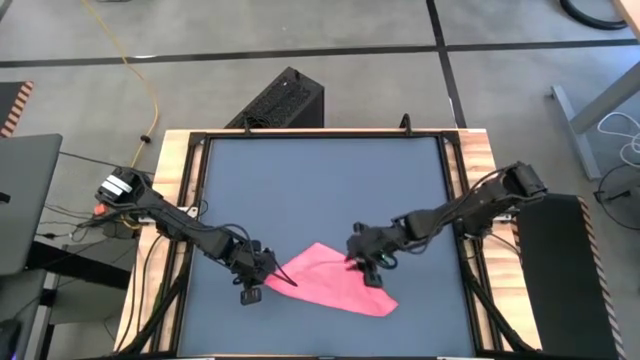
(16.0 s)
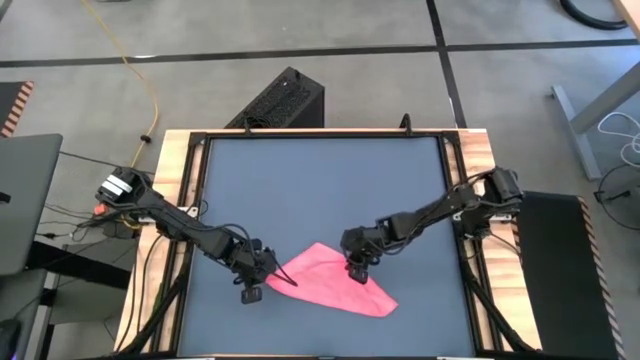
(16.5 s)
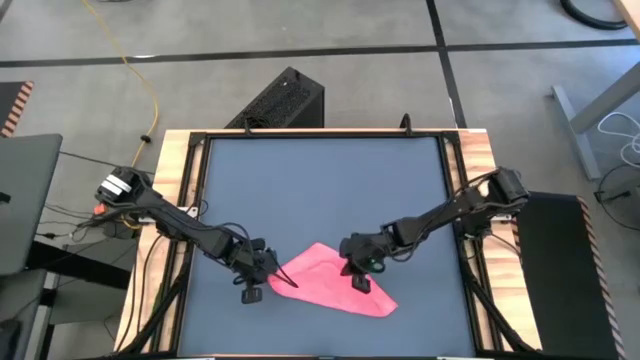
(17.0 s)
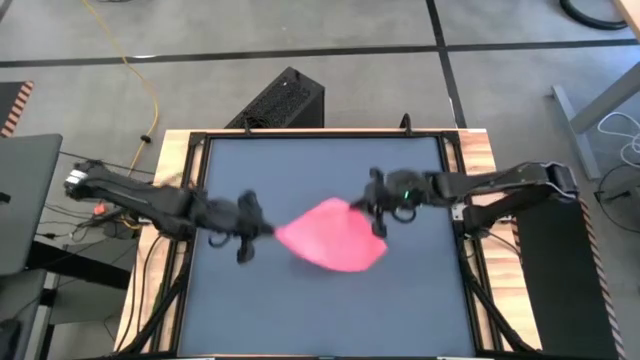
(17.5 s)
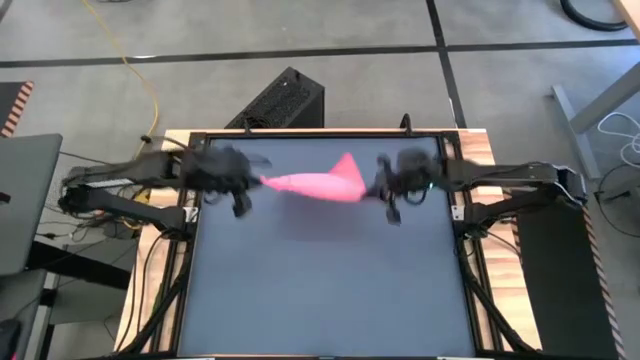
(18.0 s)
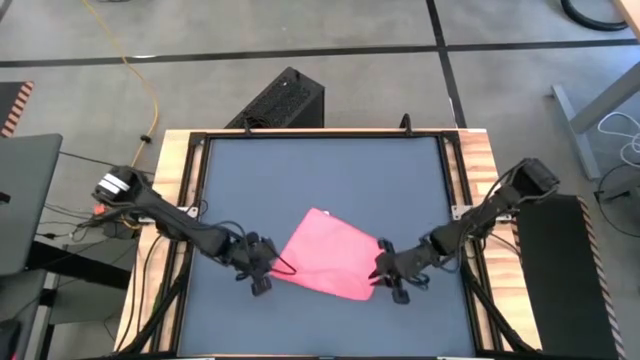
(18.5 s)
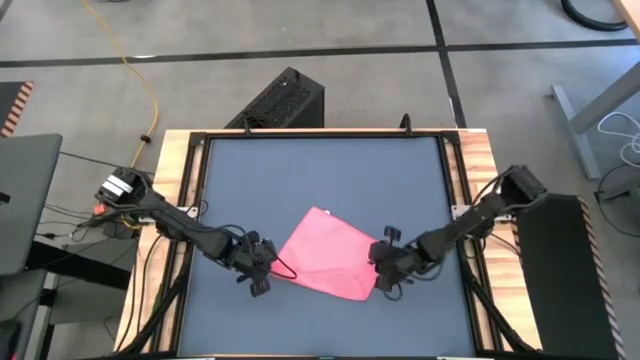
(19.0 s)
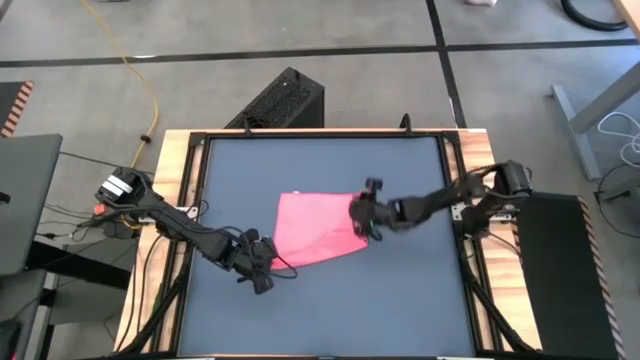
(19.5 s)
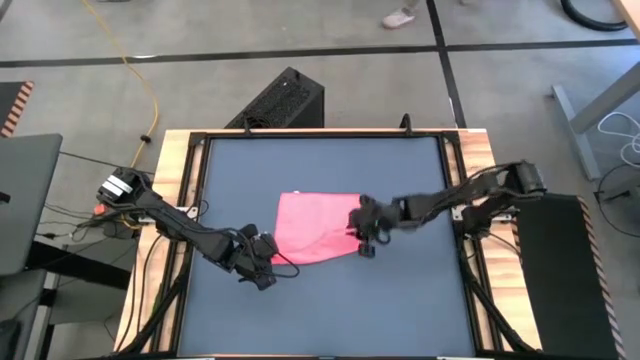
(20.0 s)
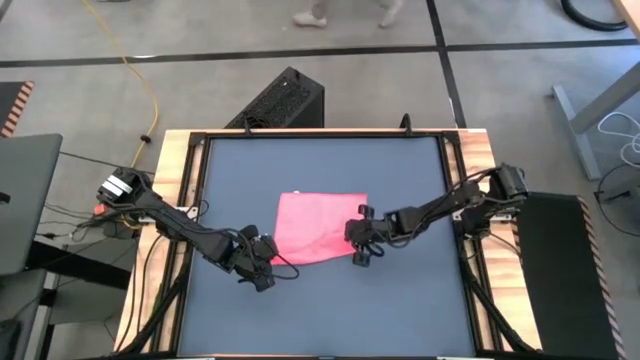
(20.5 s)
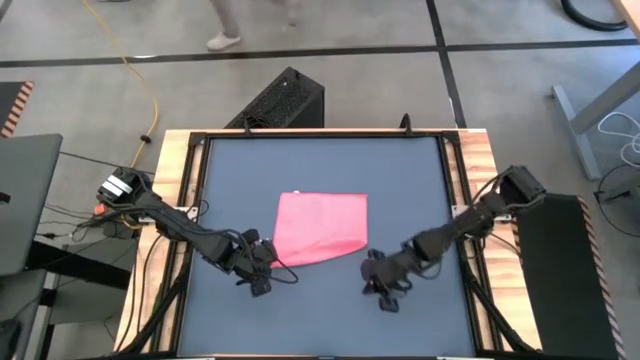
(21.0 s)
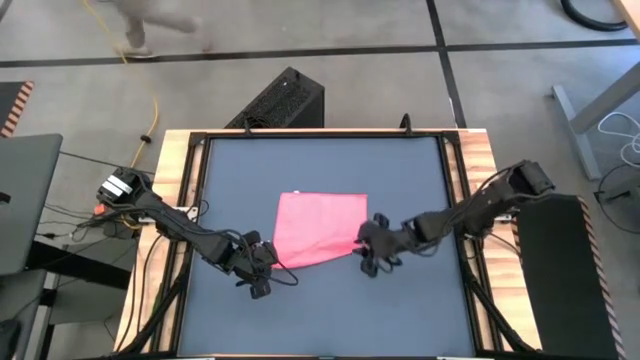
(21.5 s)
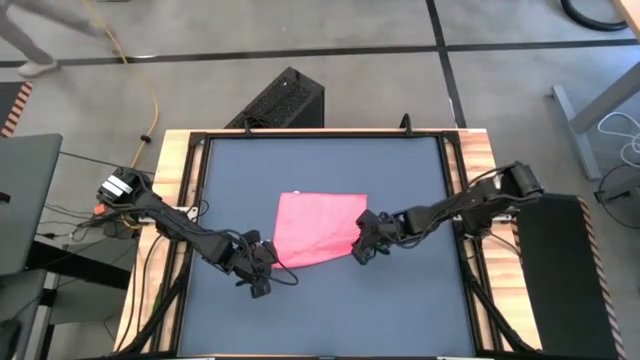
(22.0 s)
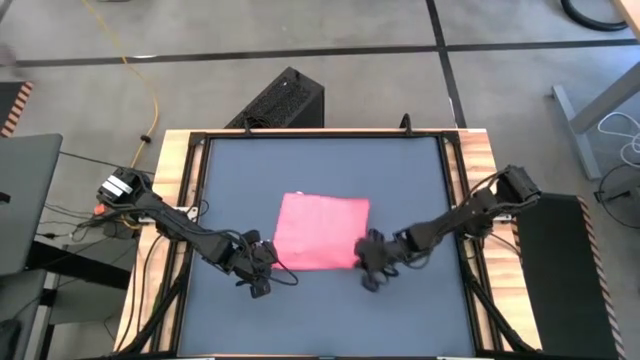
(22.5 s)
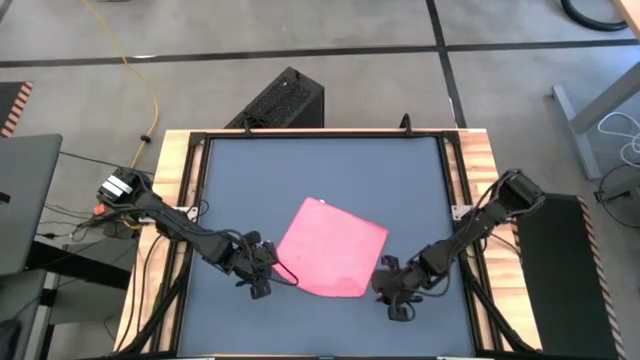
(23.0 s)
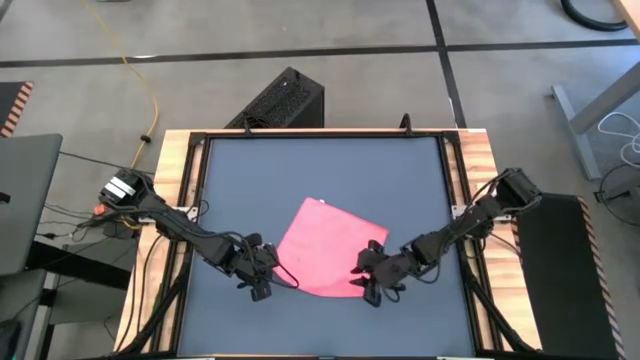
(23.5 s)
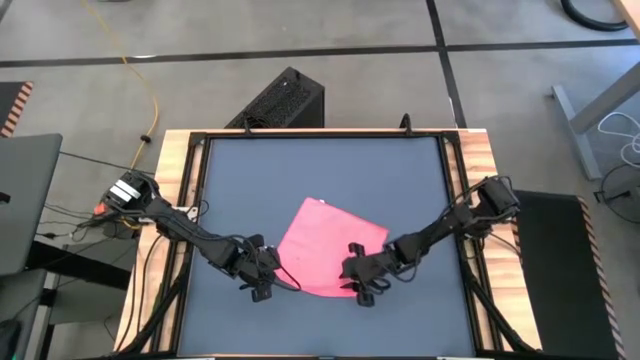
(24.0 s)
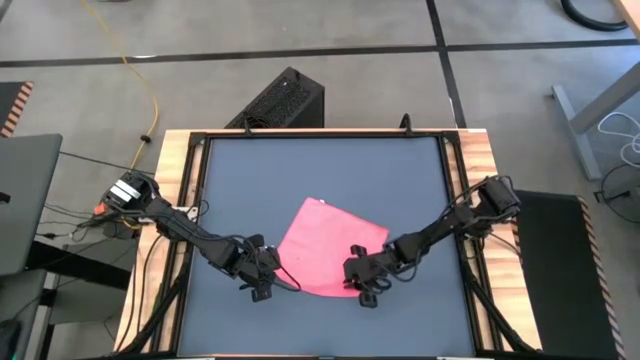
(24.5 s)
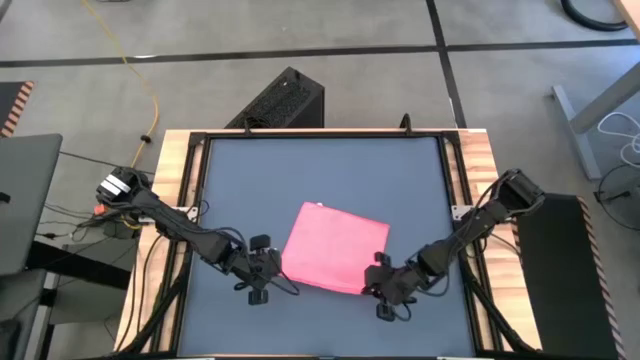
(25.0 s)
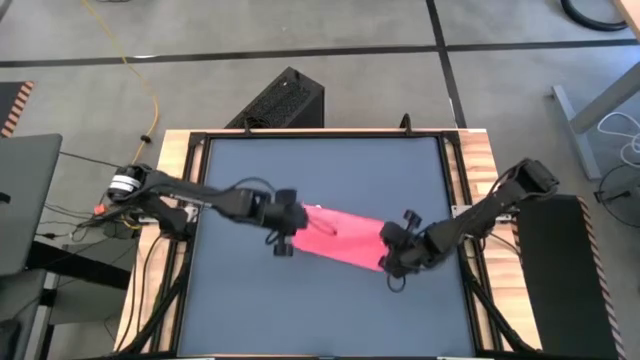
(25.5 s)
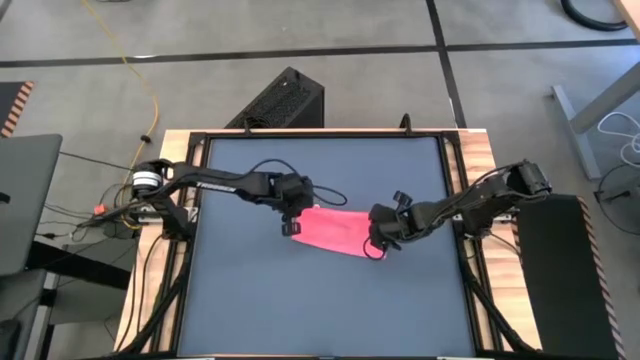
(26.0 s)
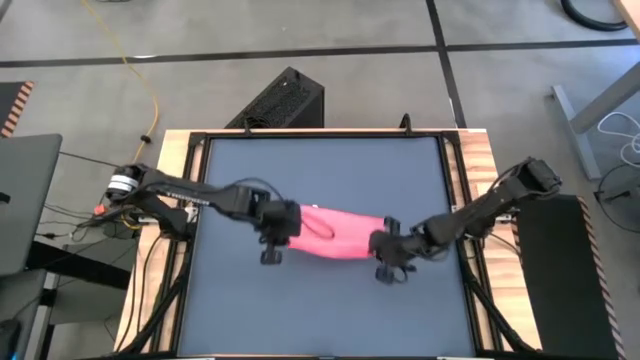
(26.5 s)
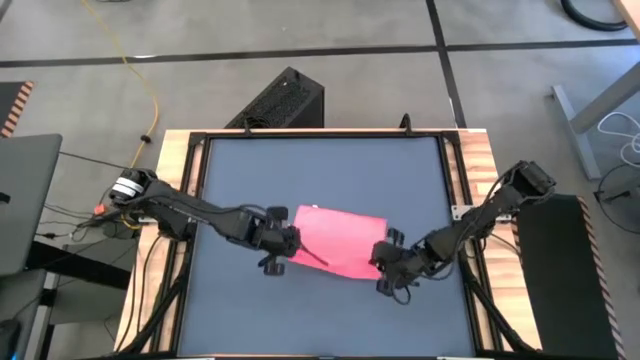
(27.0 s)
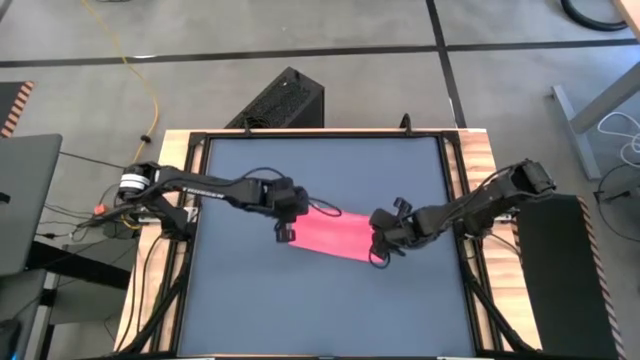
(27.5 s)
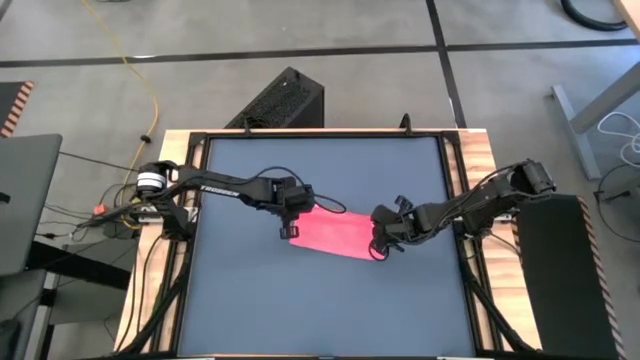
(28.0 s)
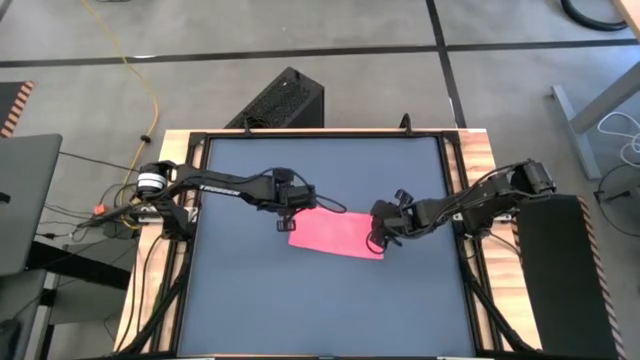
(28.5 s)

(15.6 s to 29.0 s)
Task: Roll towel
Fold the pink microfiber towel

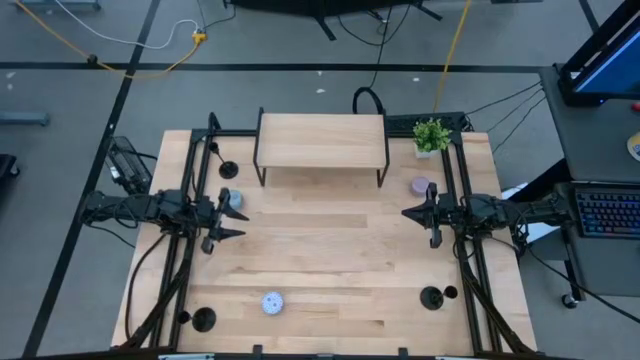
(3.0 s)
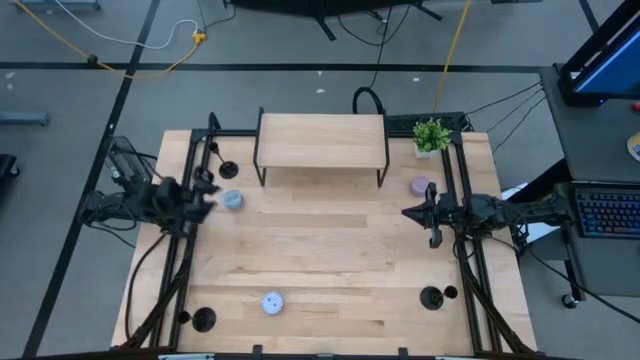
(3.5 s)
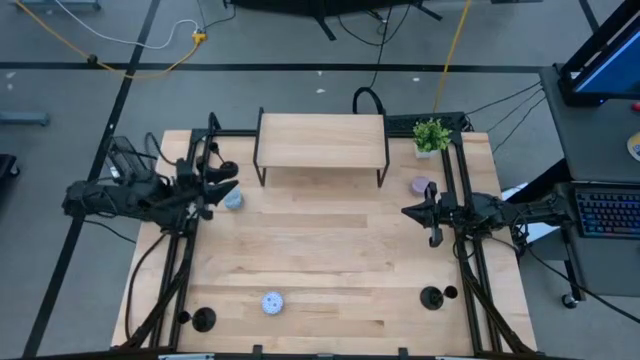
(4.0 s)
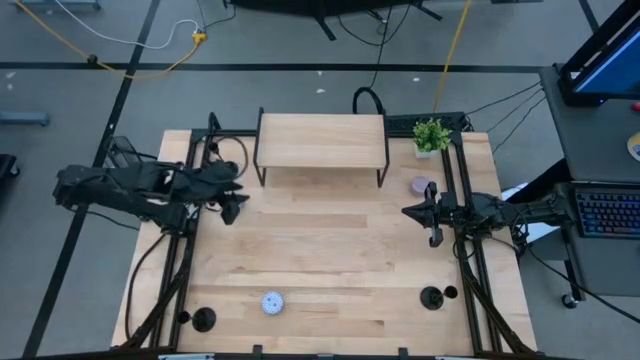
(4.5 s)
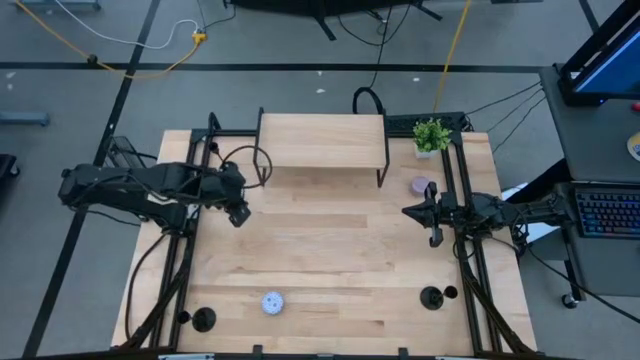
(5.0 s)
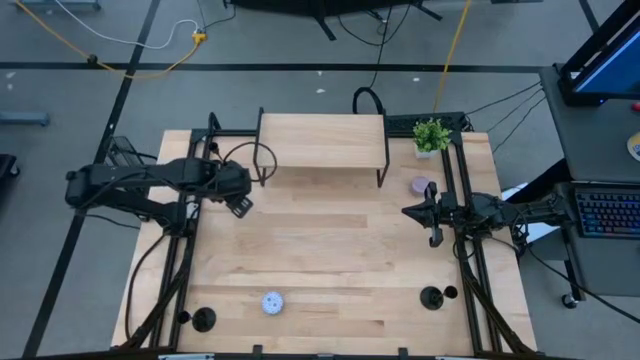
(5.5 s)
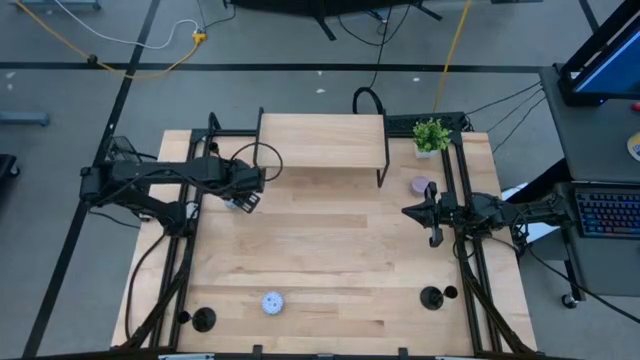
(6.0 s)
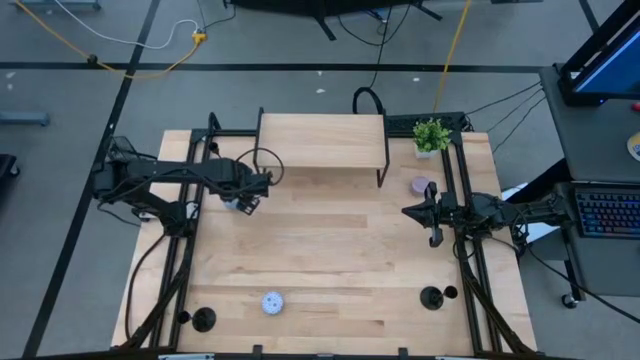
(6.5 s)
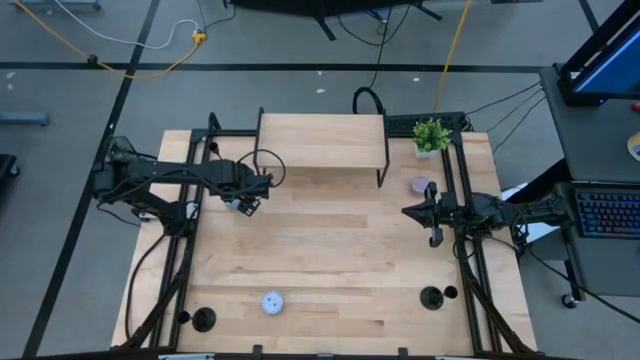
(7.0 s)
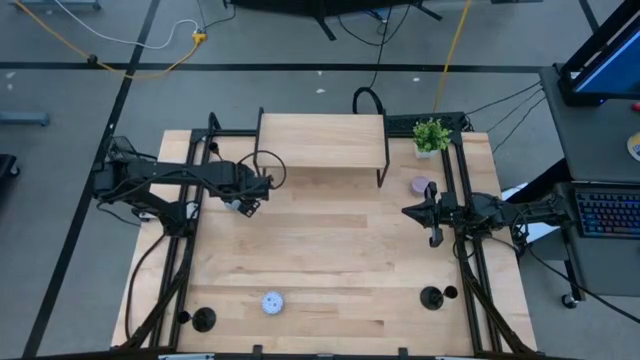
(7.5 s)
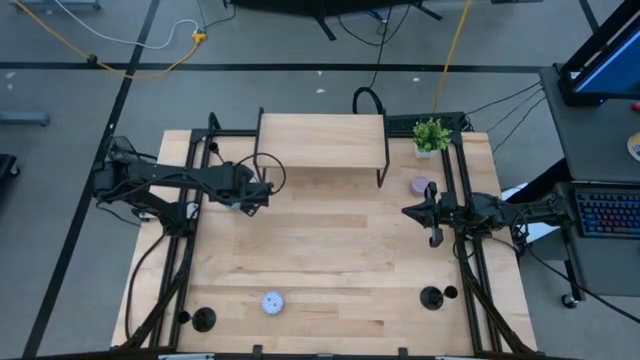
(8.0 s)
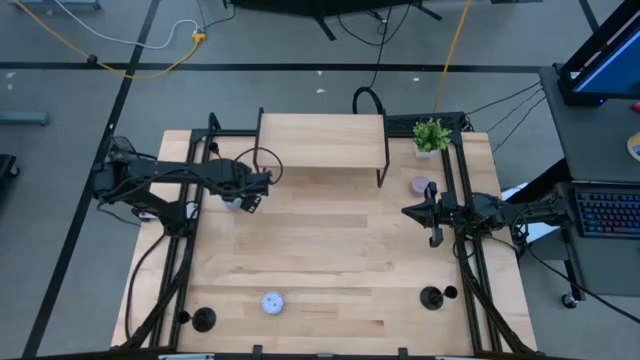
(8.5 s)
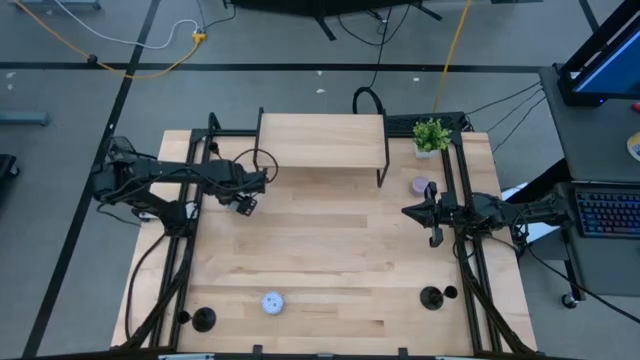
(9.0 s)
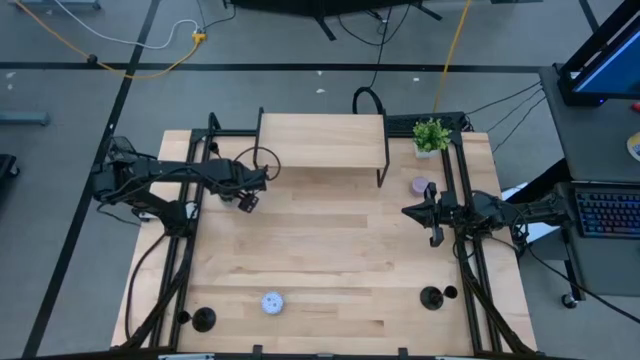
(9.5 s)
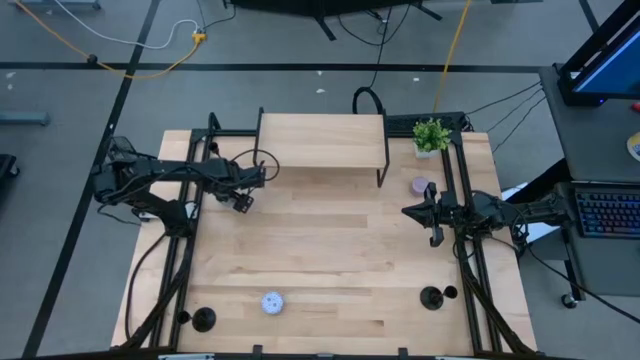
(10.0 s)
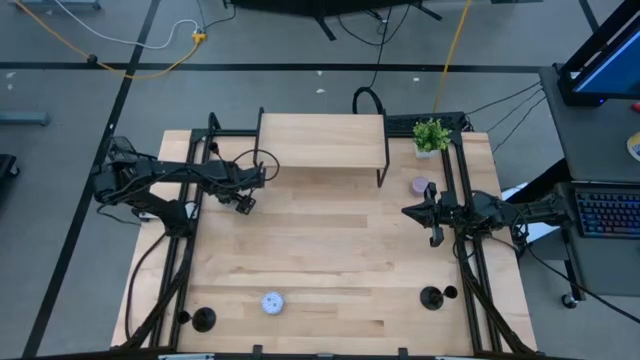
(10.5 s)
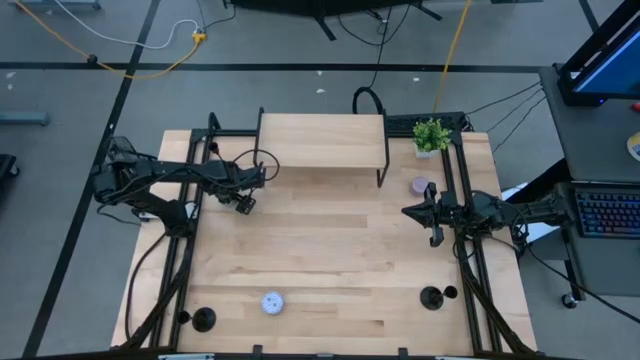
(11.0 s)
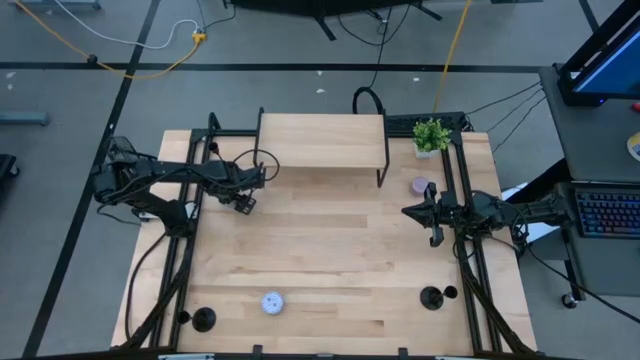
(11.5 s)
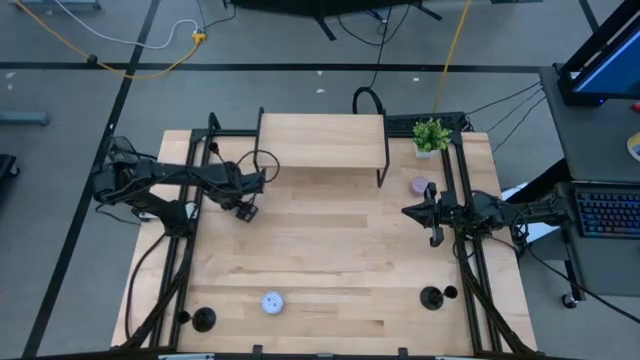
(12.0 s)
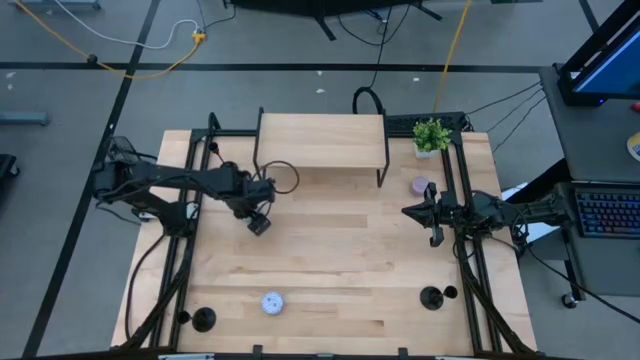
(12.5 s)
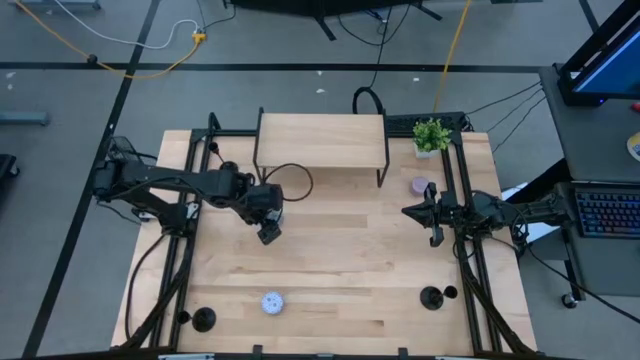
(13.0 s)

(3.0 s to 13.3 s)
Task: Pick & Place candle stick holders
Put the blue scented candle on the shelf
